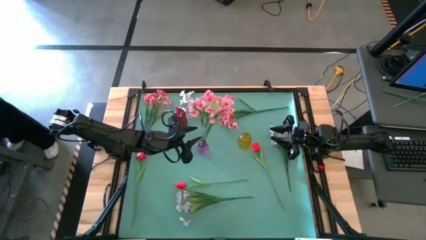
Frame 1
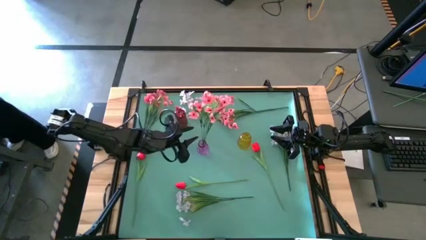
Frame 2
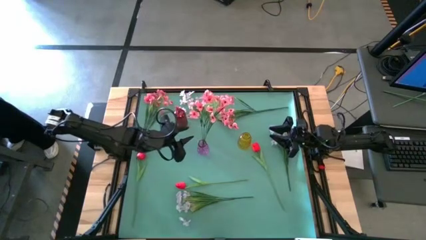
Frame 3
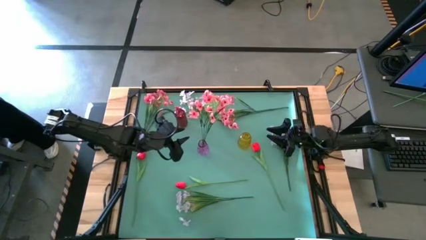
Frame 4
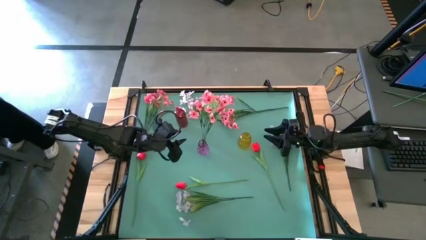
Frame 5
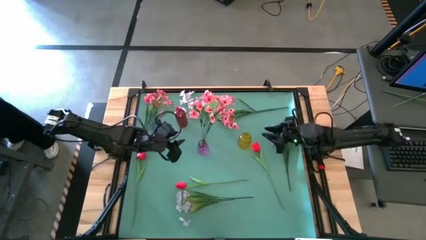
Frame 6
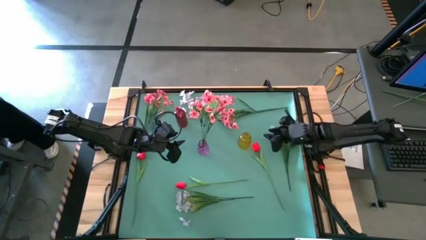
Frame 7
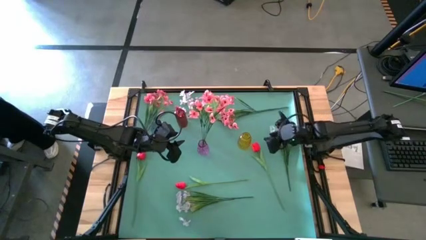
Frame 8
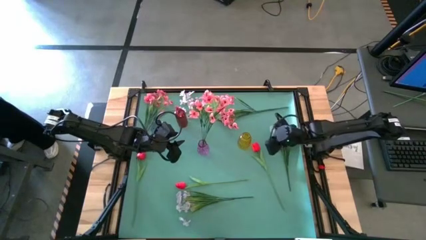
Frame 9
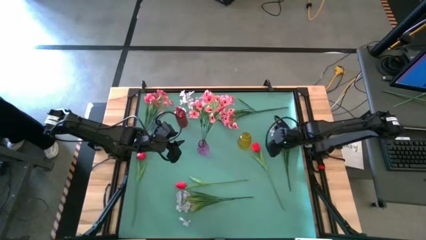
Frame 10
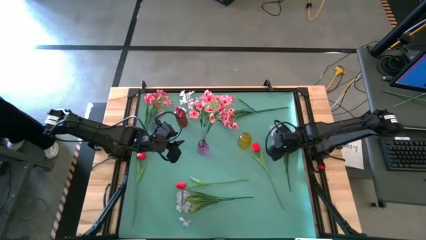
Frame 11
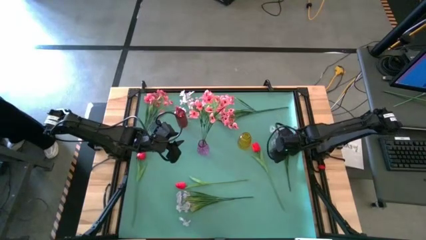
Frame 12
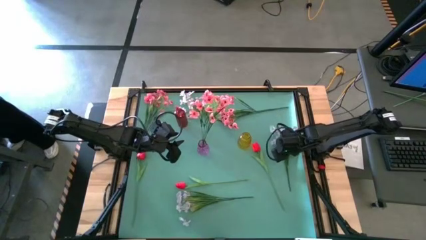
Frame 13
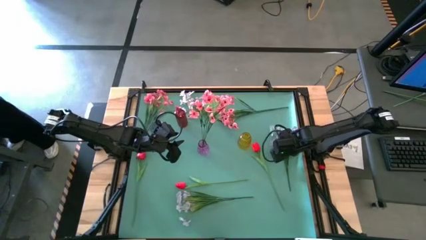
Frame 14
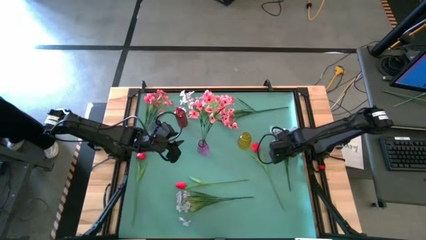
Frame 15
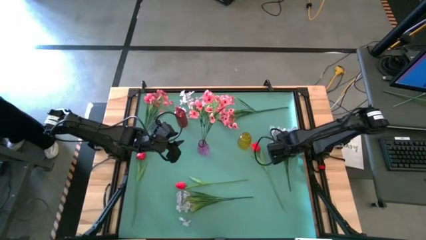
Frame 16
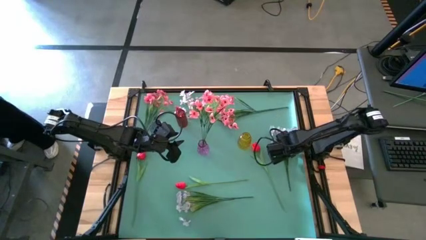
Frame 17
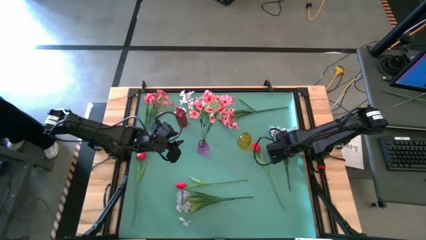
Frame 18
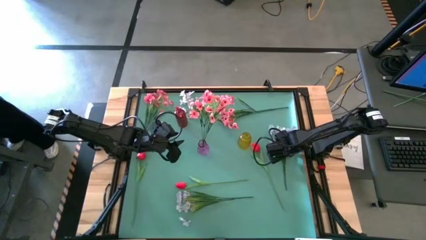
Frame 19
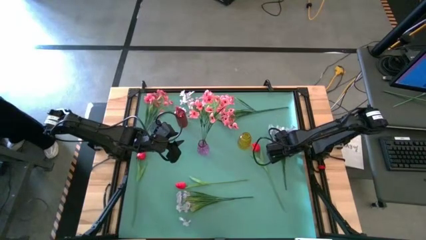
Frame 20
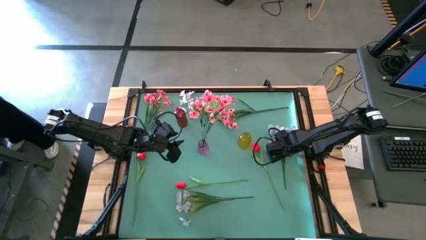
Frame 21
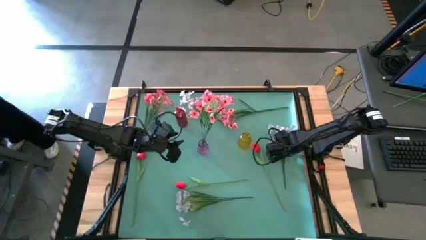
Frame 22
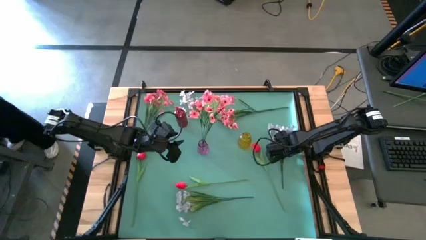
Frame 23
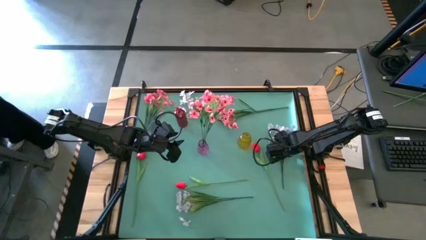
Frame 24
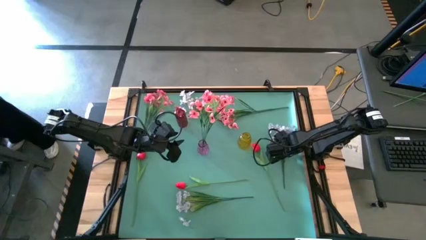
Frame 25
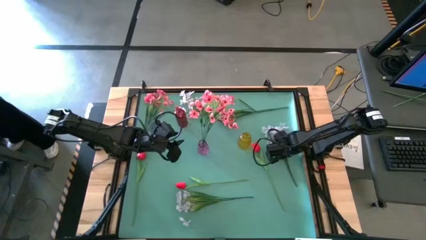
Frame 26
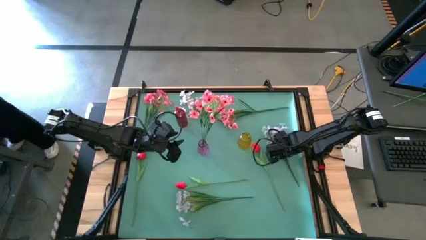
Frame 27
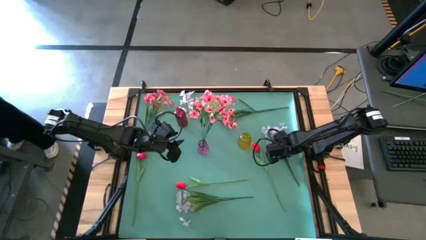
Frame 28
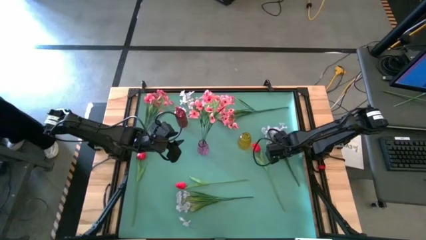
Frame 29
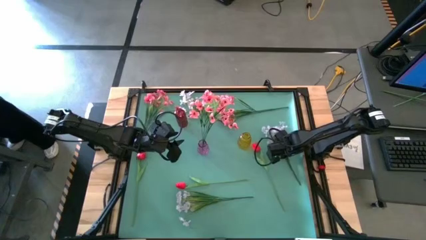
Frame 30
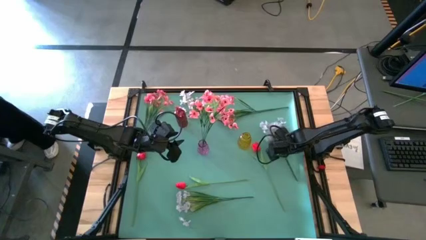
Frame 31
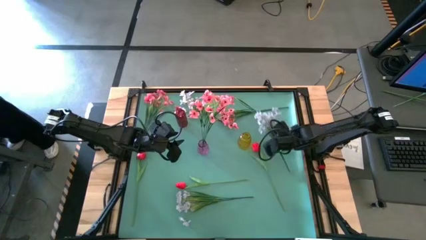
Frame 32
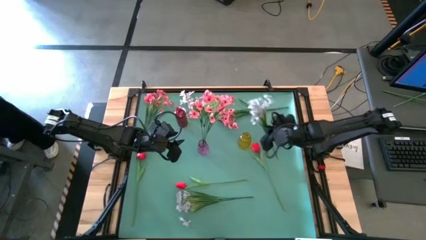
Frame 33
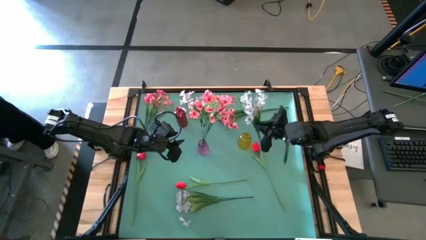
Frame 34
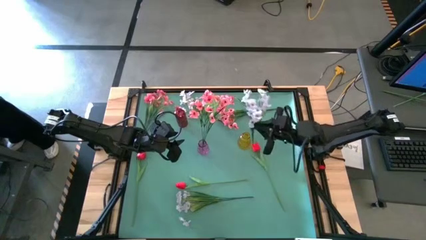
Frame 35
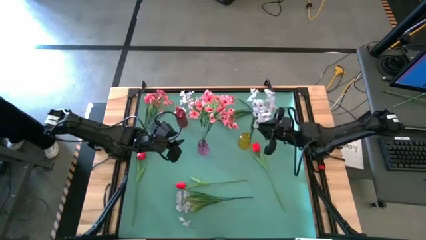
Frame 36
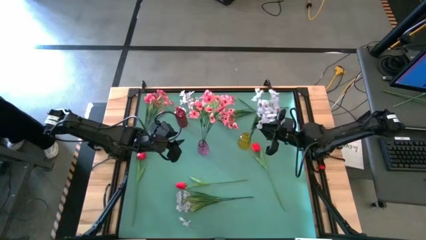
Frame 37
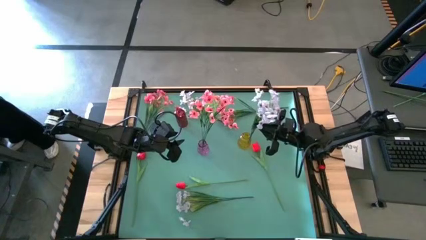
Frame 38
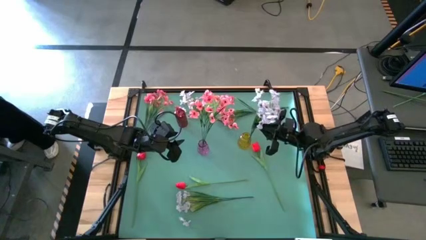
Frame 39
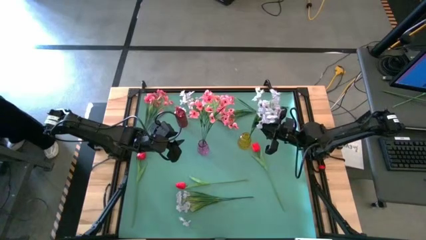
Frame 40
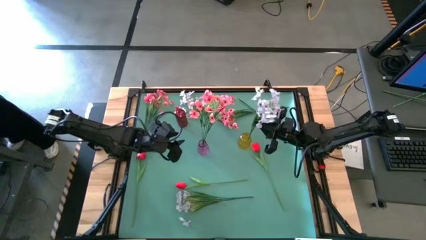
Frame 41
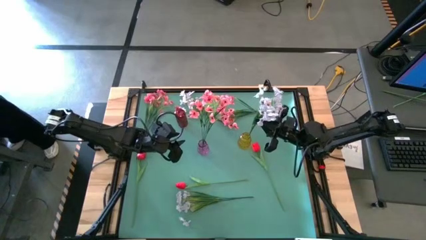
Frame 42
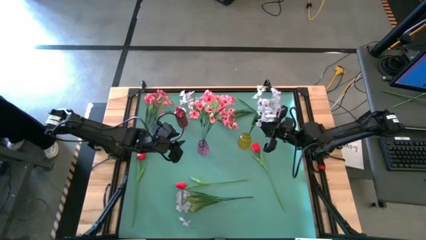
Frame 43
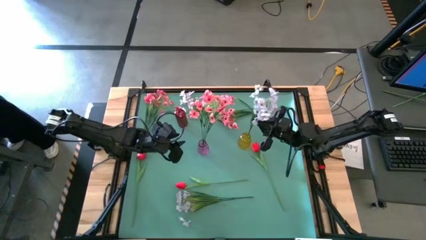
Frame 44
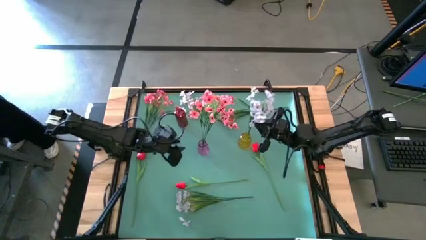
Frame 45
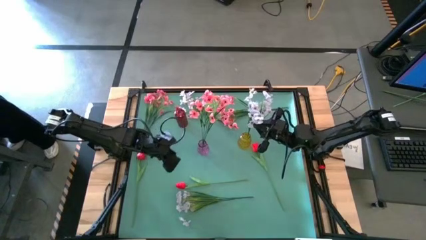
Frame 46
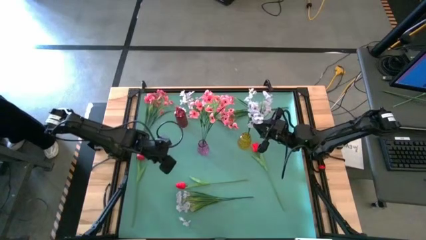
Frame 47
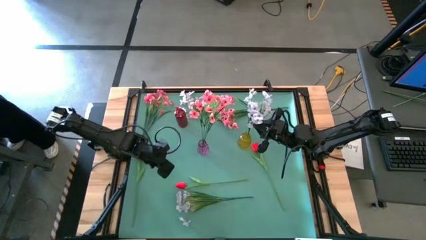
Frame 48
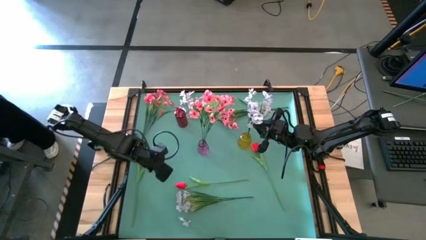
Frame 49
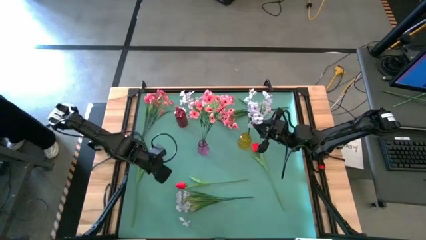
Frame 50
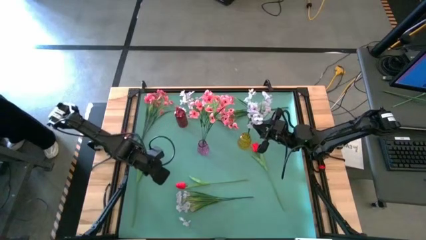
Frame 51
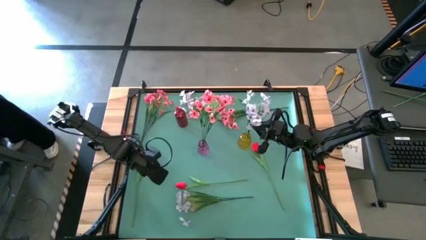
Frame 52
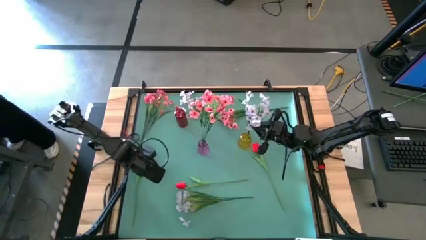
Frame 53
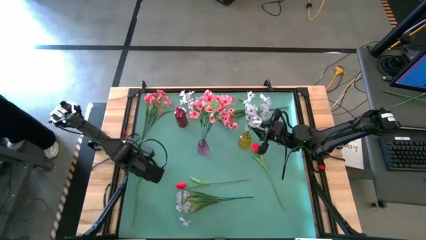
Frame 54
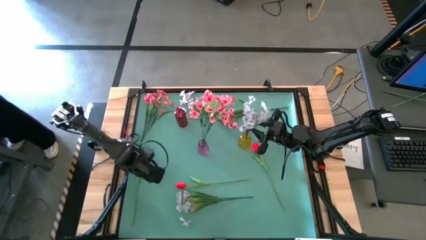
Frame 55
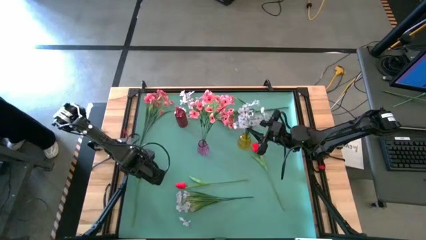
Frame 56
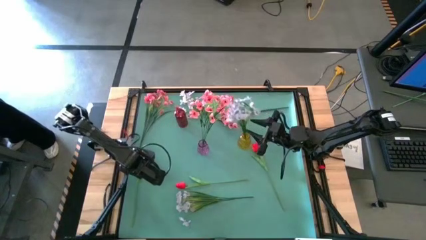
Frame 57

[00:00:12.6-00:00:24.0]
Task: Sort flowers into vase by color
Put the middle right white flower into the yellow vase
